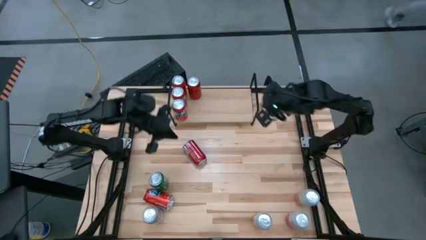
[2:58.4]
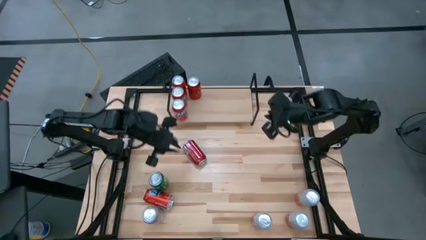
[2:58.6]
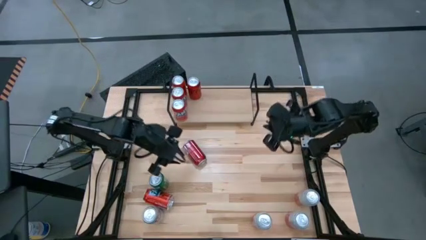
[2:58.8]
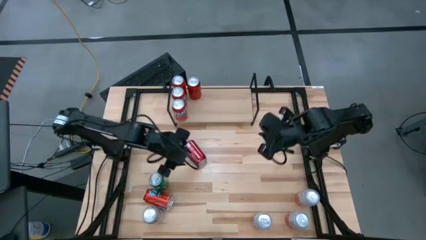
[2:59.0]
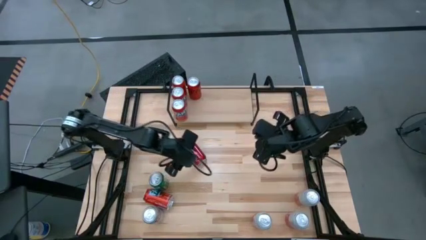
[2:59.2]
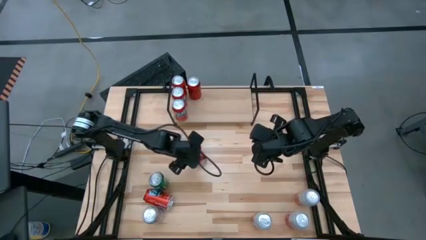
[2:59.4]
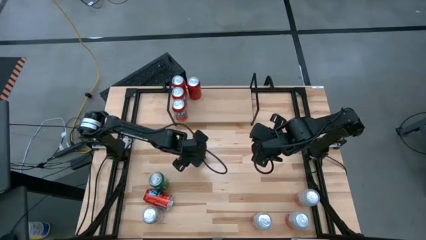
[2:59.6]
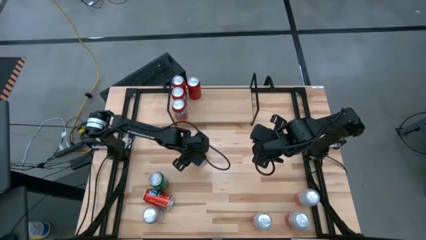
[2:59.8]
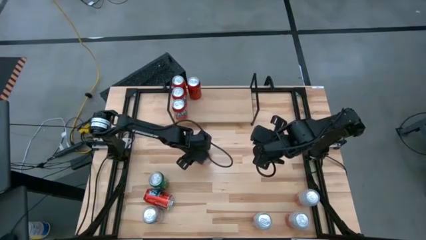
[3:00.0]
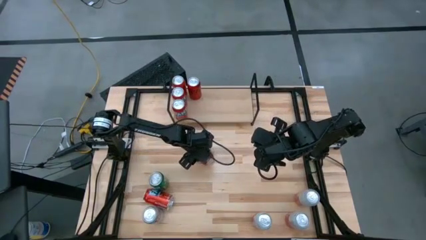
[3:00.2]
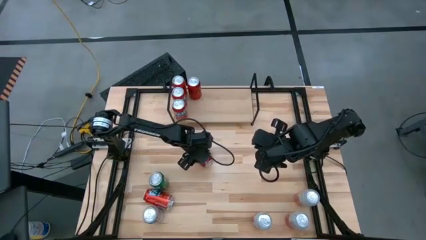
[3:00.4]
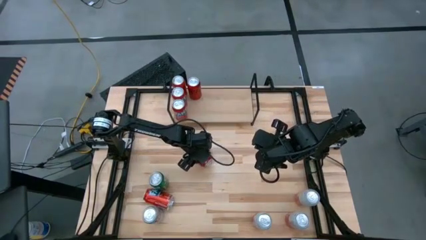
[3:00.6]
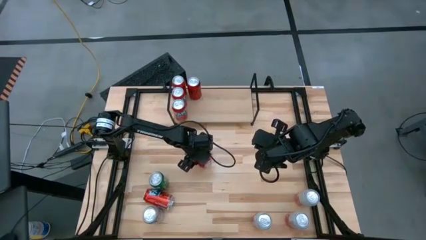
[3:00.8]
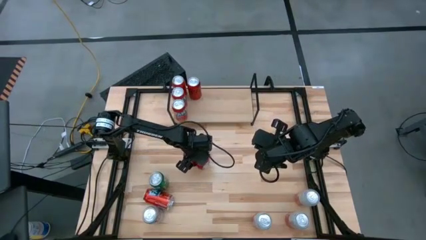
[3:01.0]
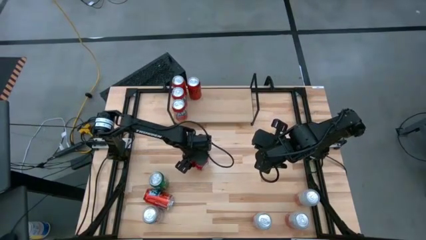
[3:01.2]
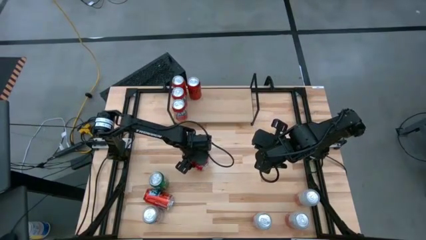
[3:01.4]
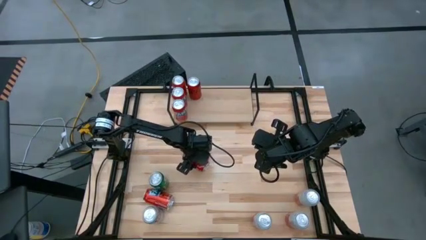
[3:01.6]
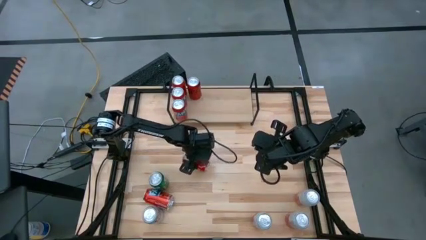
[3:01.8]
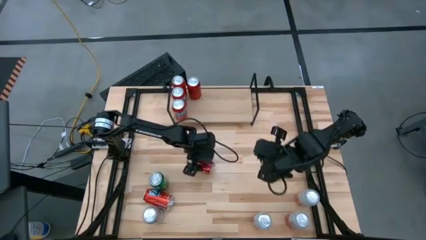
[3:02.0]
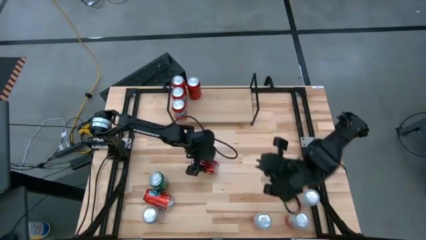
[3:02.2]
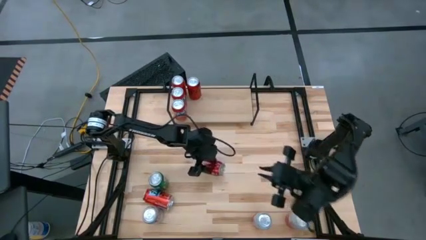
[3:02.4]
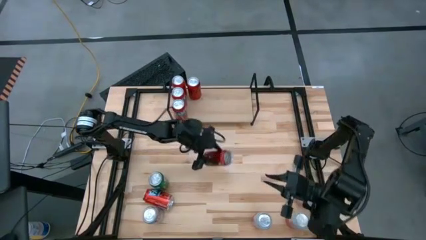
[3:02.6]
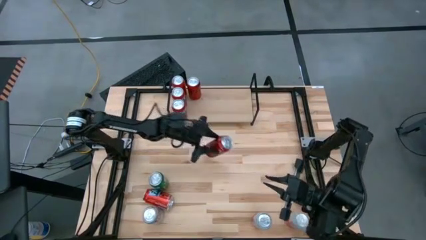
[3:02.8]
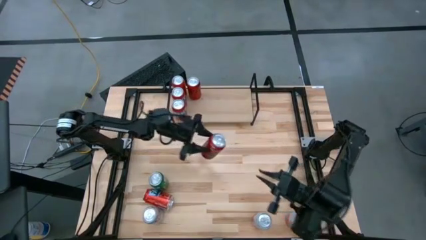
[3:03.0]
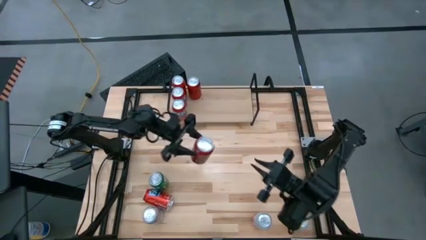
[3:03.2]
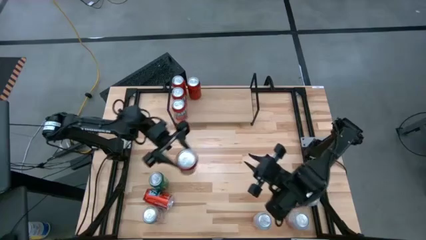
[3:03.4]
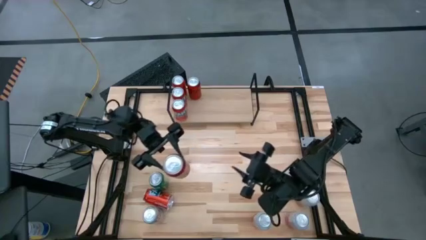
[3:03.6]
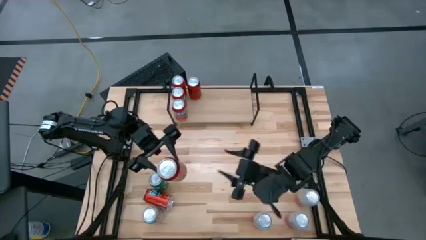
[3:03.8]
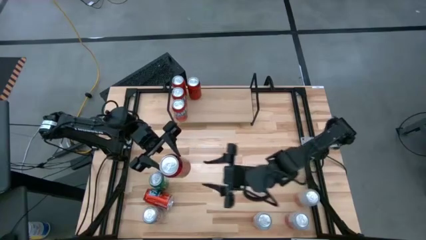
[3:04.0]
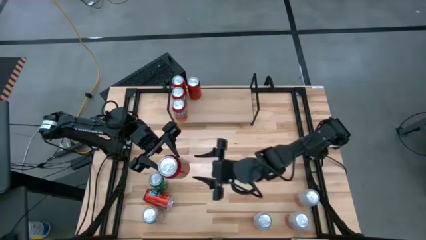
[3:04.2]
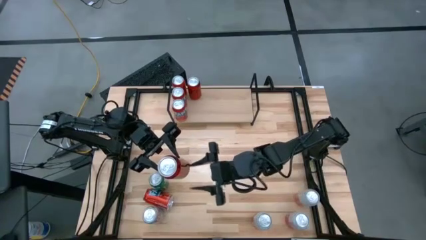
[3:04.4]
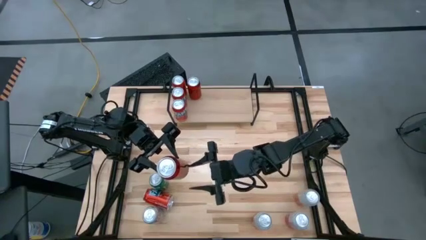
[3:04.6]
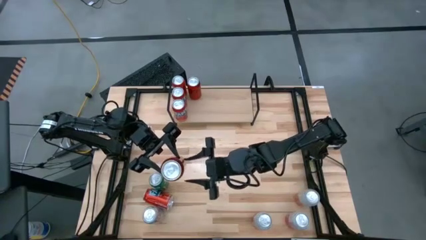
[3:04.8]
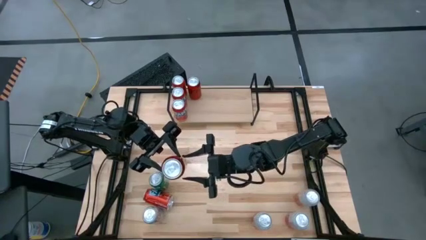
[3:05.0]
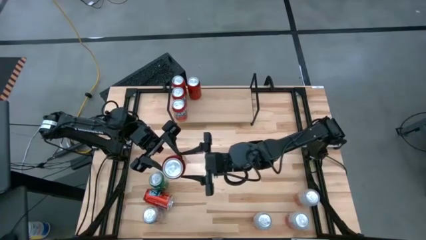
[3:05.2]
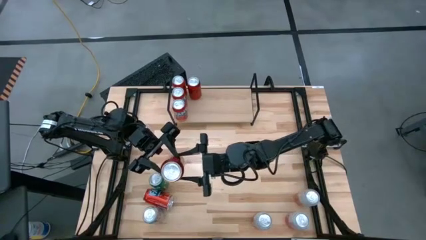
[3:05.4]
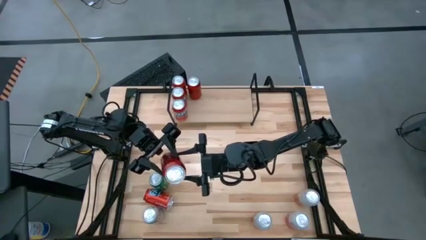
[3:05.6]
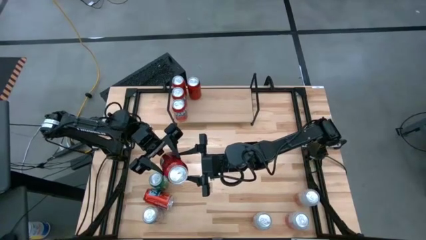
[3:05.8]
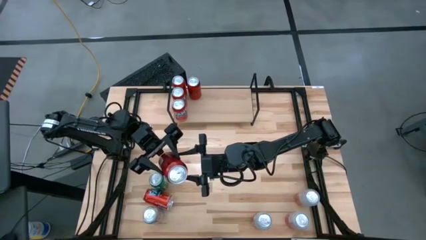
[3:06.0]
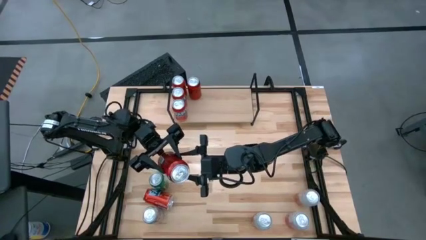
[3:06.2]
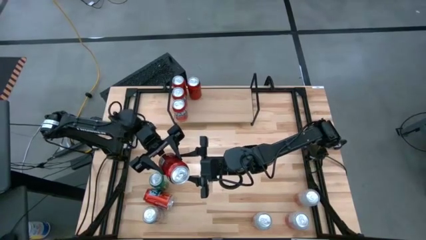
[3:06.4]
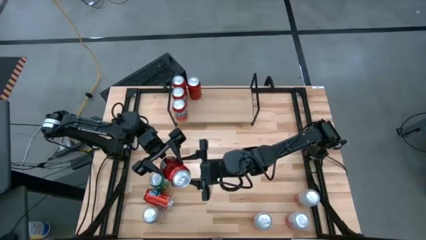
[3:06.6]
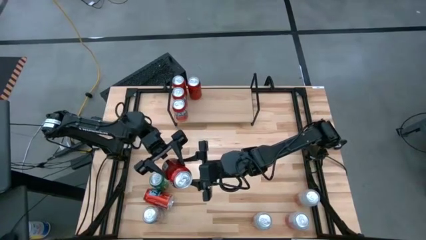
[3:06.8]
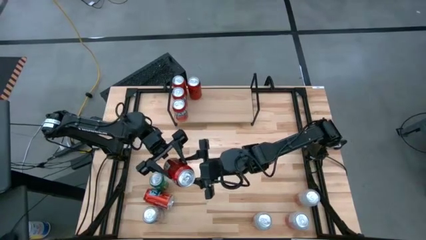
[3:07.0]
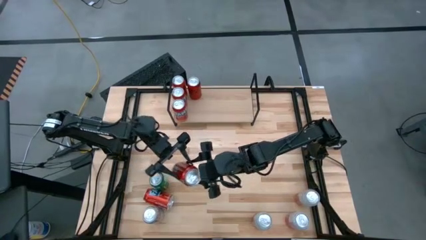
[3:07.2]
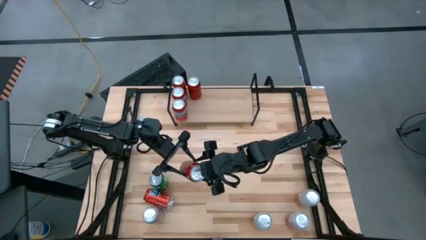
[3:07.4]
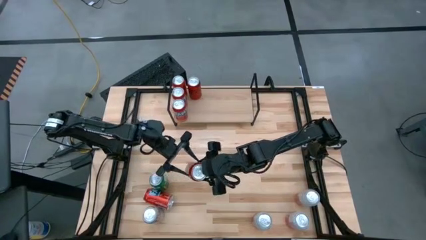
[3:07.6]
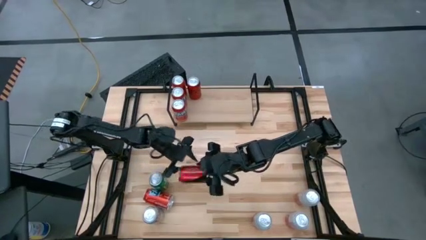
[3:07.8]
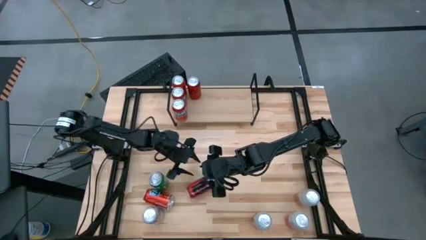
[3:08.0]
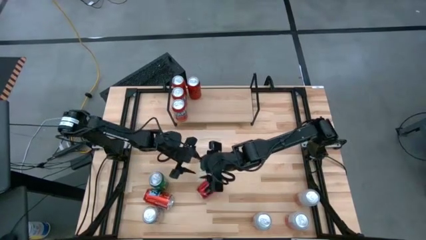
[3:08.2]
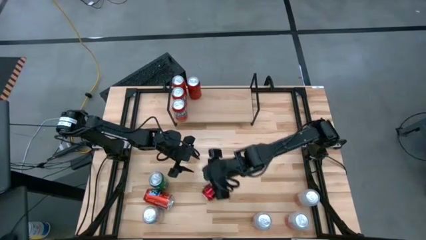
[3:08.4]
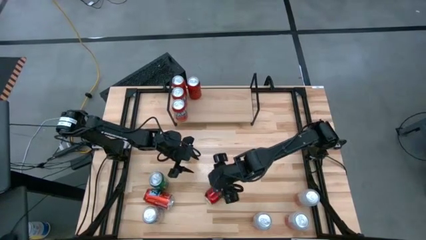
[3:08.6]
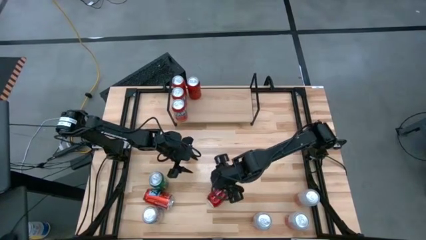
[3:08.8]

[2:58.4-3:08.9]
Task: Place canned beverage on shelf
Put the red black soda can on the shelf and align with the other red black soda cans

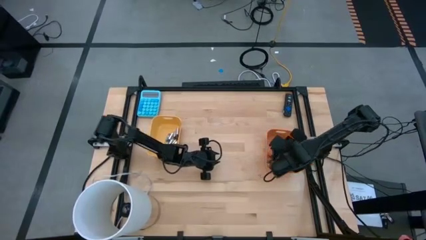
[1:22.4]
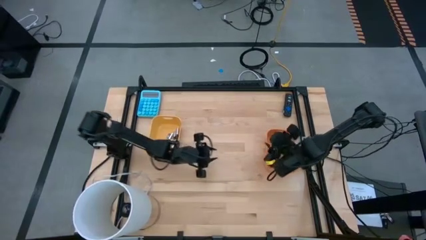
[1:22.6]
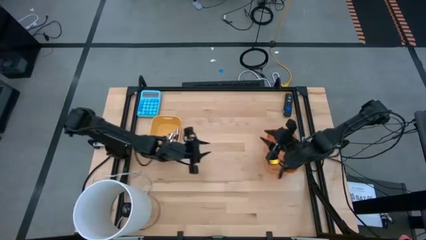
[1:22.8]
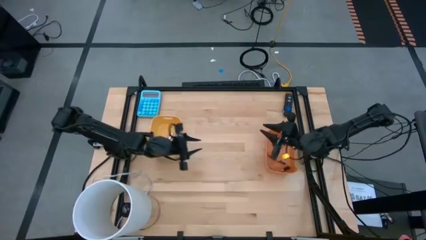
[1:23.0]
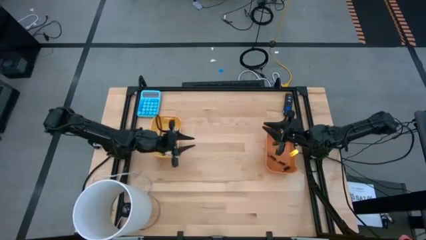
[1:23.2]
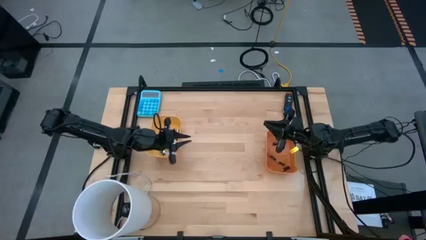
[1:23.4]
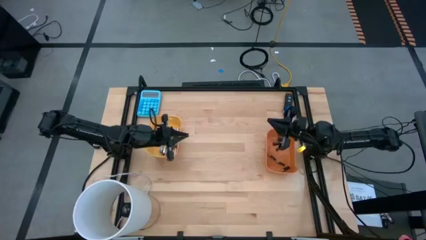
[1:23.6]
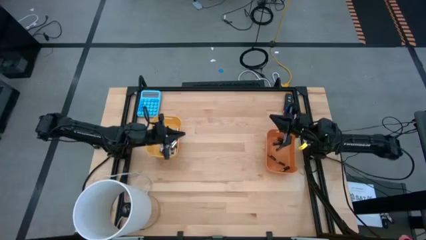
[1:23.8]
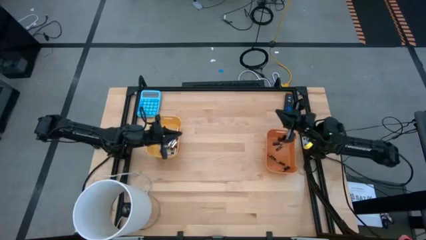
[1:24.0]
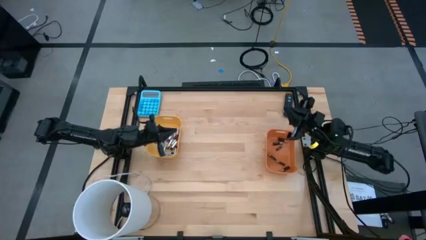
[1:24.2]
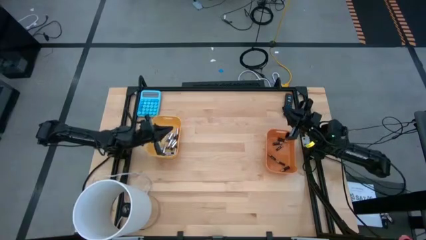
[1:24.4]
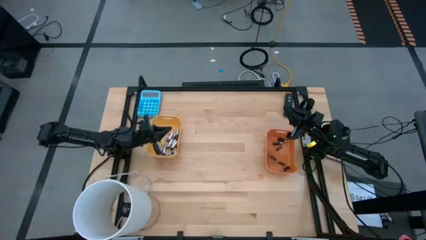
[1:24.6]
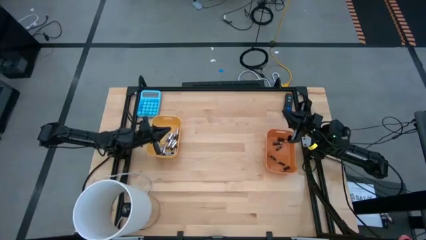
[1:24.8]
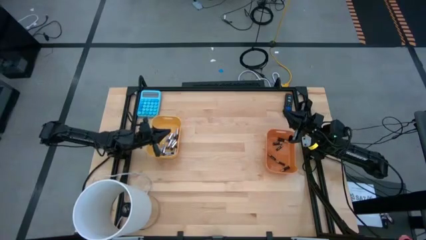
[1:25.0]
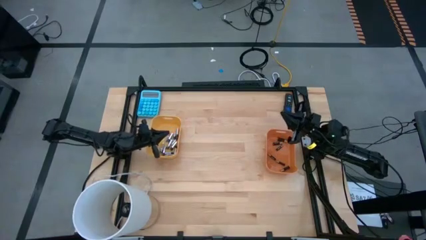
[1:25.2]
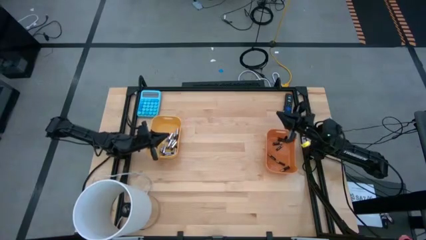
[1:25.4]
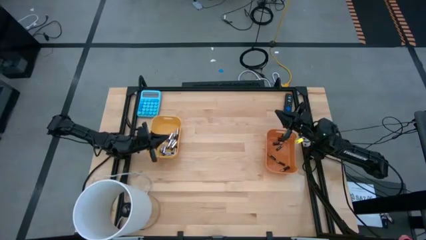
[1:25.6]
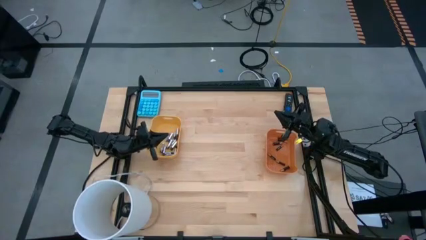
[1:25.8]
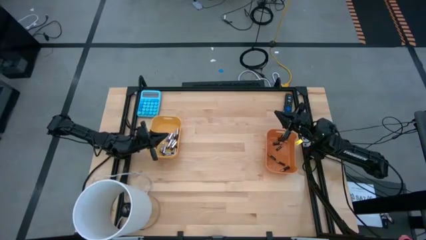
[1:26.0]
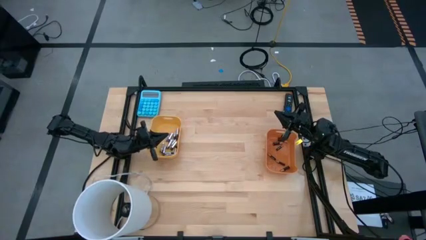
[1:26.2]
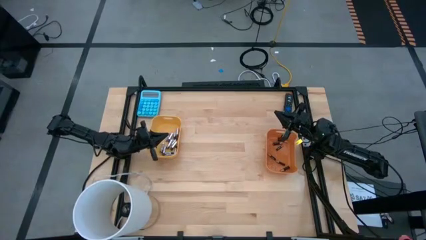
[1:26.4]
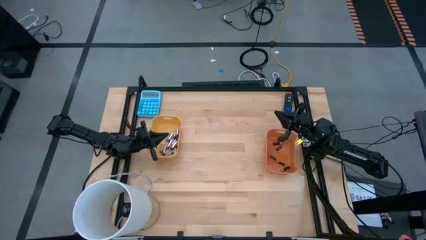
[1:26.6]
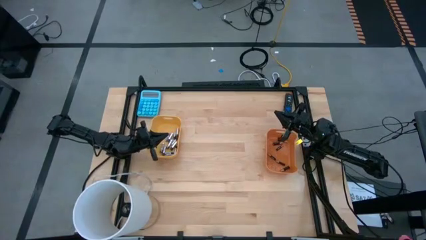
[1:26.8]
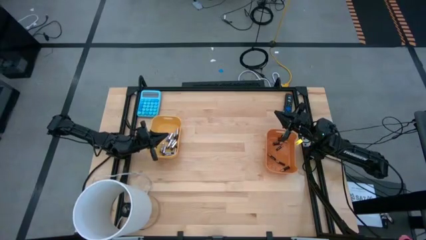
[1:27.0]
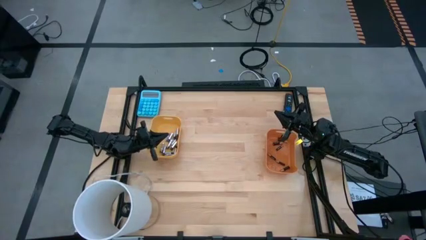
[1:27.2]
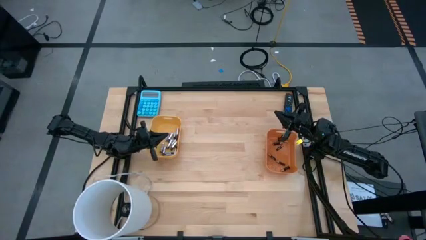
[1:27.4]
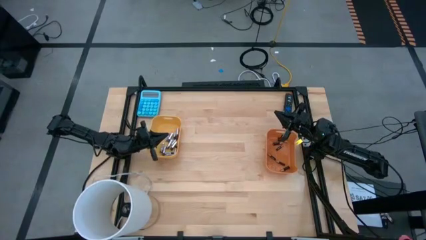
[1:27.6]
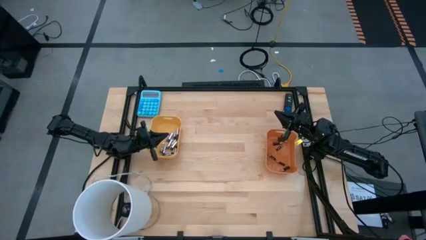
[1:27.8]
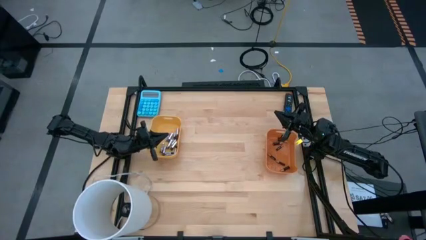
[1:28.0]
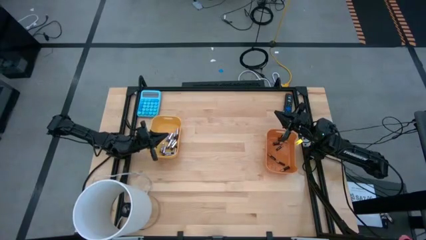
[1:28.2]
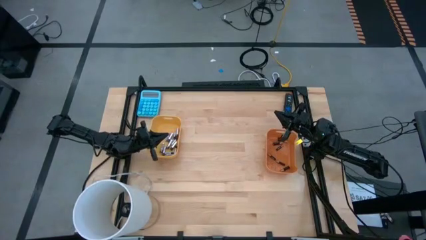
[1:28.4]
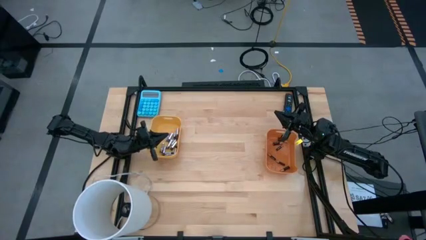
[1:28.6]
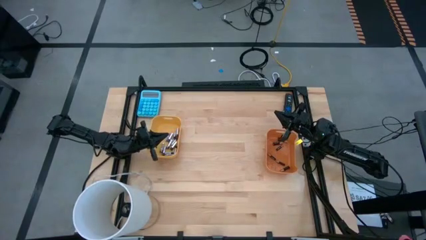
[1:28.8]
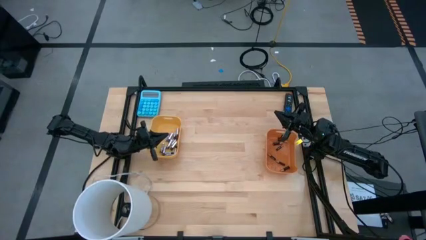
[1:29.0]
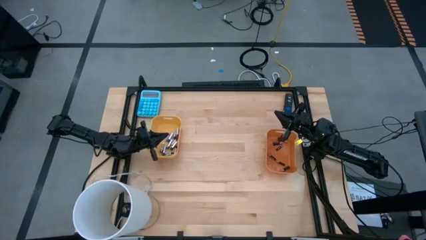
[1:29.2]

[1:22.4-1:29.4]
Task: Sort batteries
Return to Home Position
